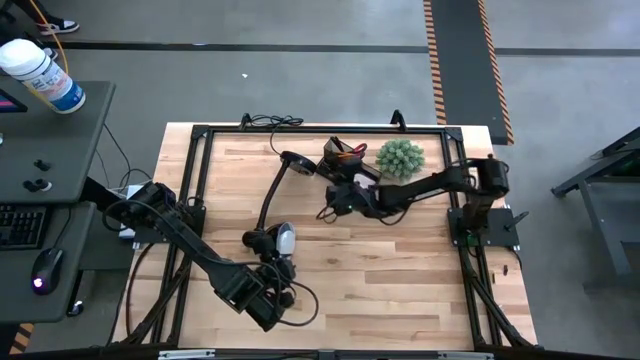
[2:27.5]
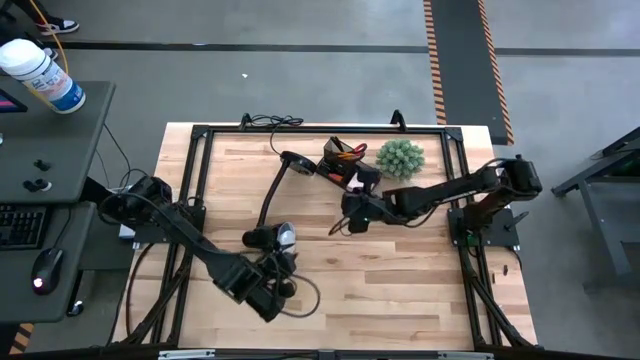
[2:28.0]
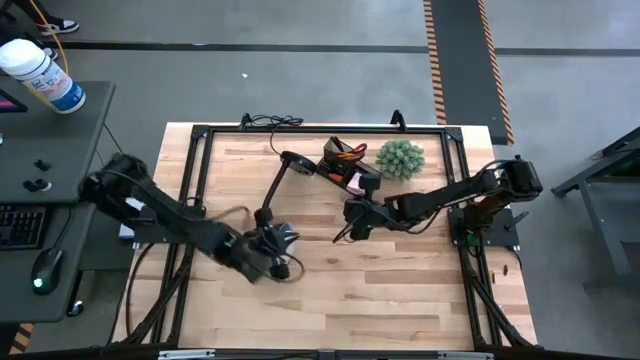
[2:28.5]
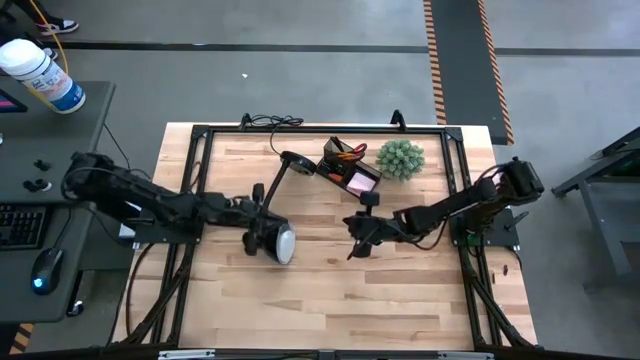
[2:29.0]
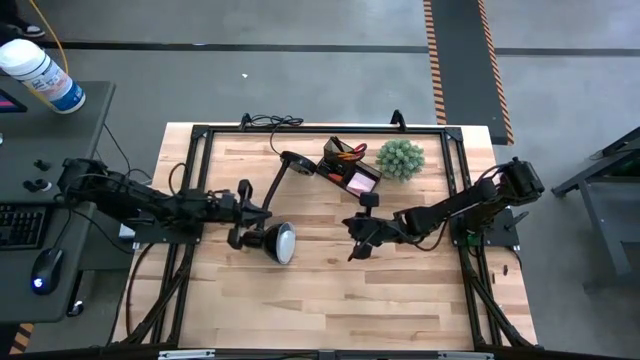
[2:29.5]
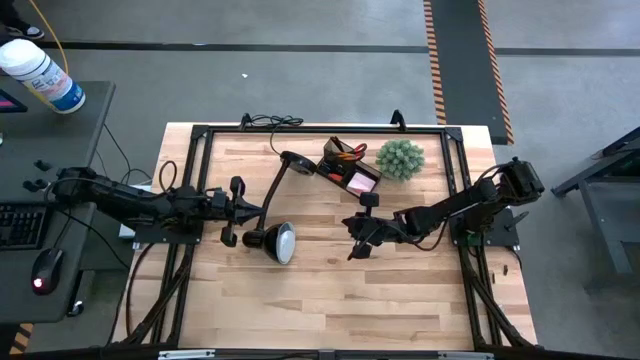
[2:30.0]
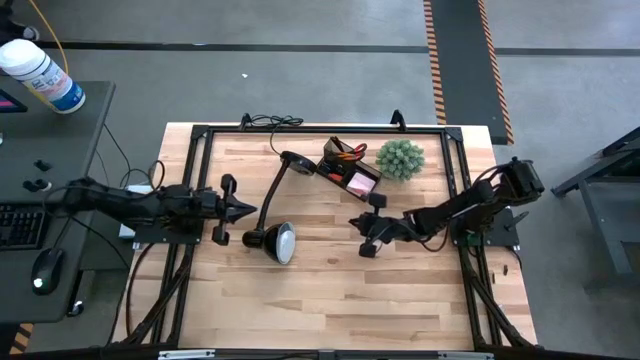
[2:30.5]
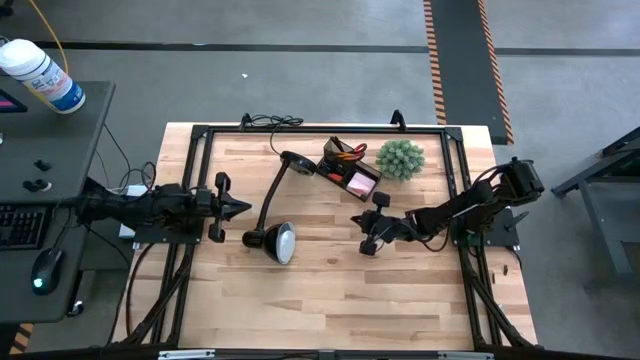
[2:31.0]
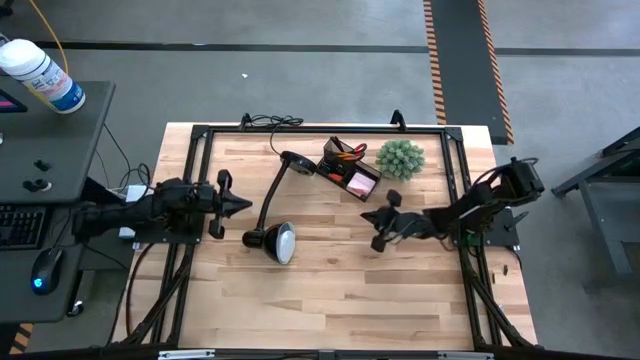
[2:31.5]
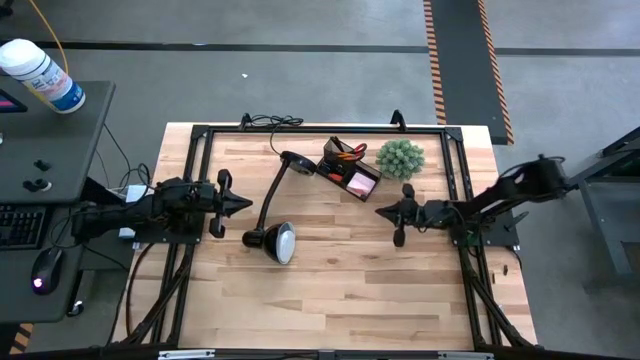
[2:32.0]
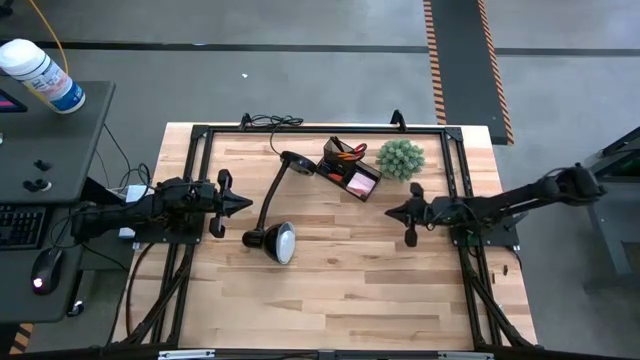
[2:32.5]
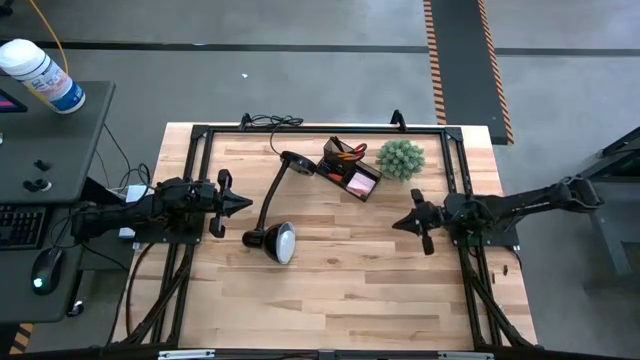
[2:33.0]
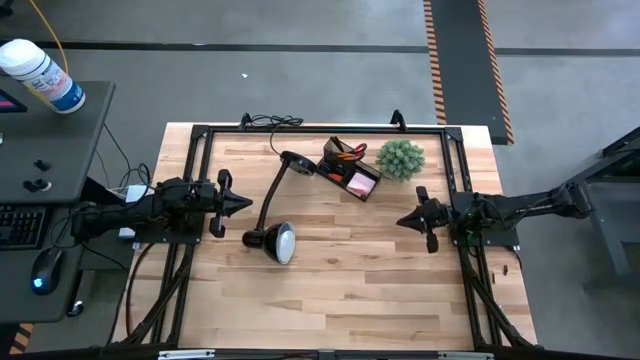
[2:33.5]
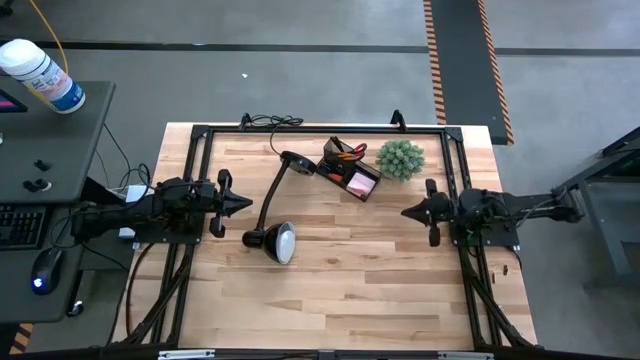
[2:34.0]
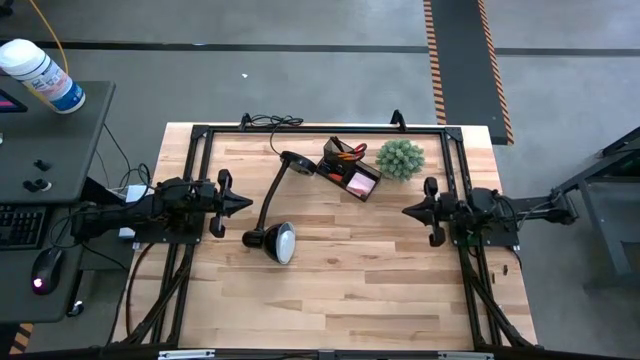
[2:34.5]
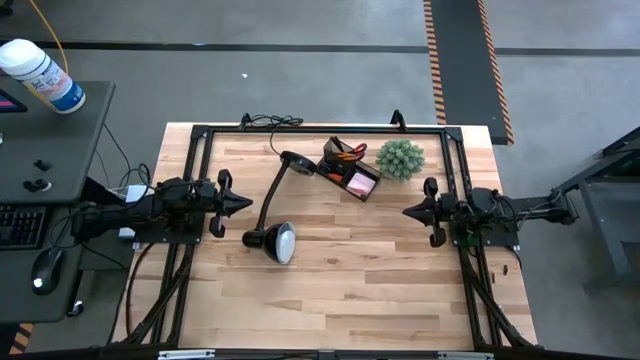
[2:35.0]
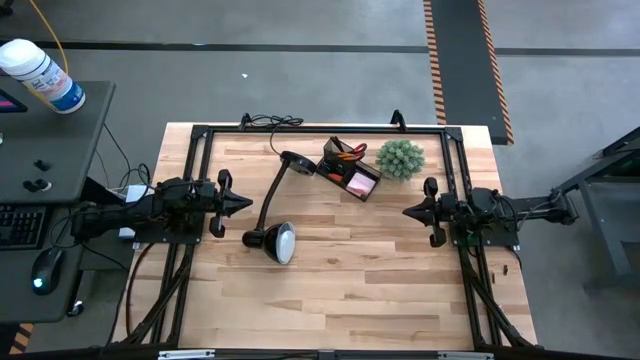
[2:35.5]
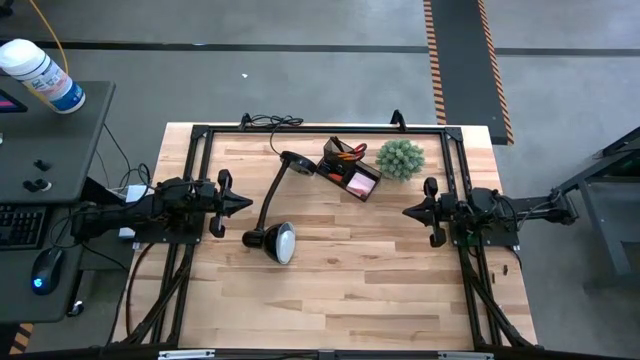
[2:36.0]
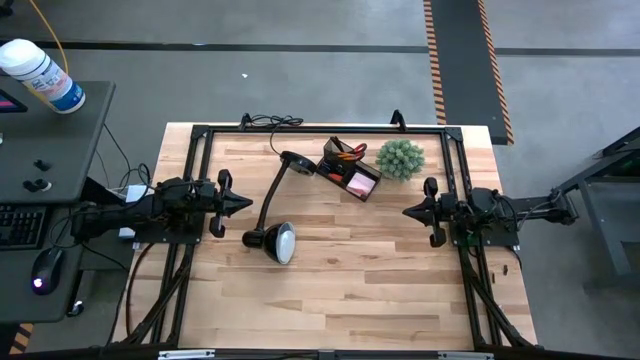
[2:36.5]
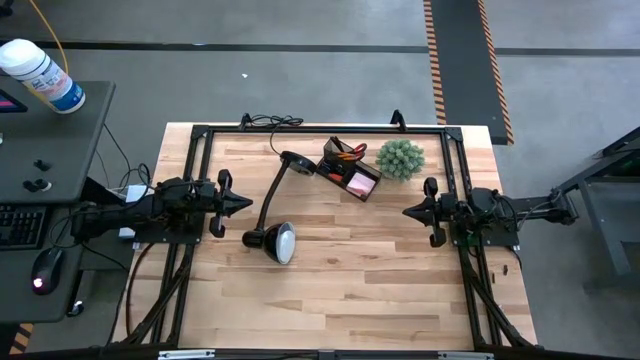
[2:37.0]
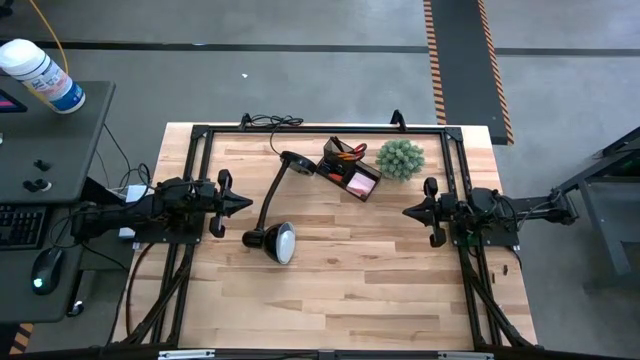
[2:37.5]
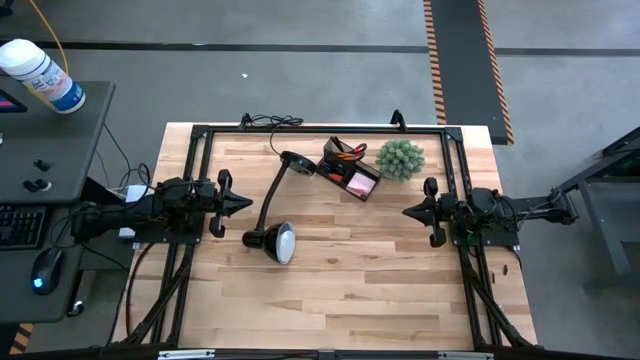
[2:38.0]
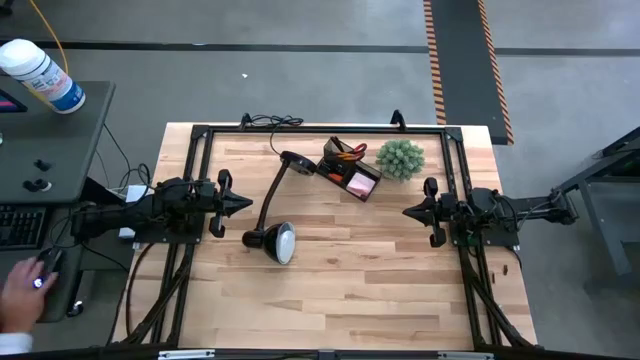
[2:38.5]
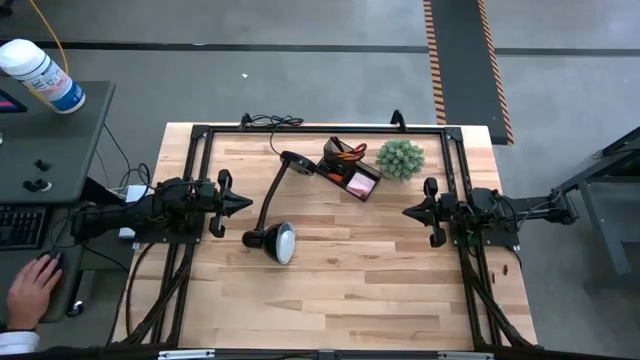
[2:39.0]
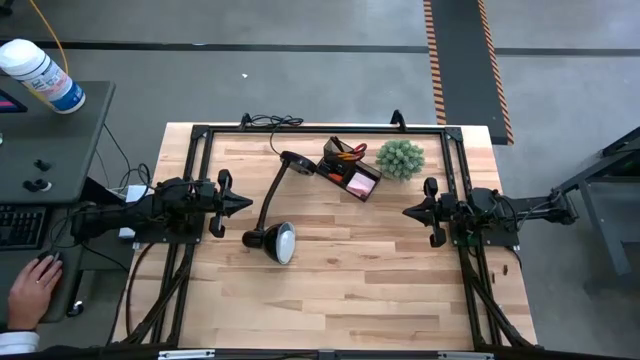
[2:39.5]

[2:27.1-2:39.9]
Task: Pick and place office supplies into organizer
Return to Home Position

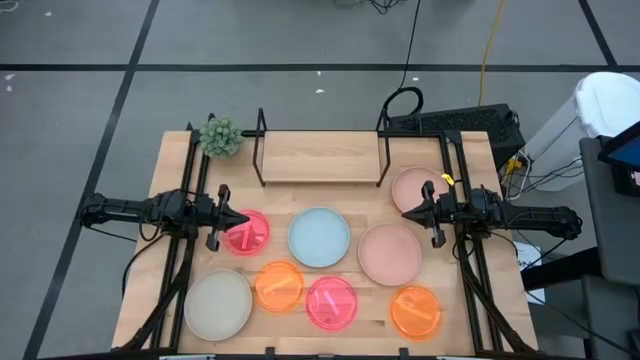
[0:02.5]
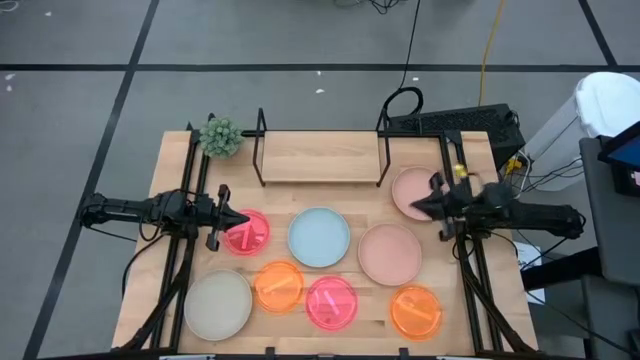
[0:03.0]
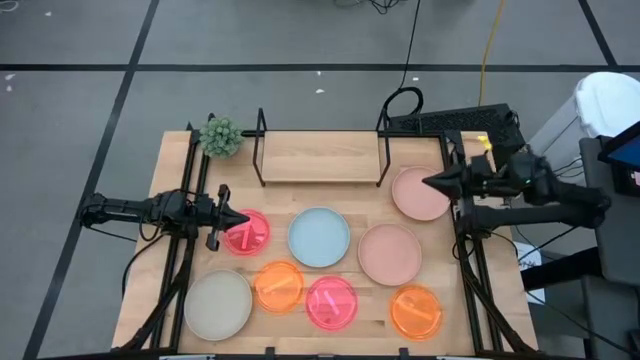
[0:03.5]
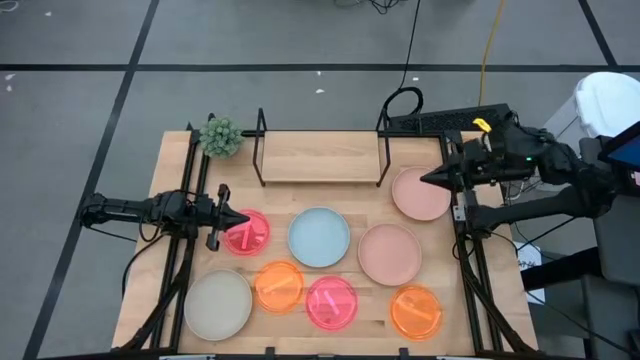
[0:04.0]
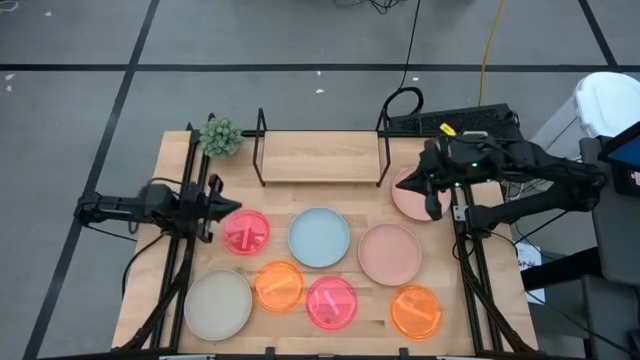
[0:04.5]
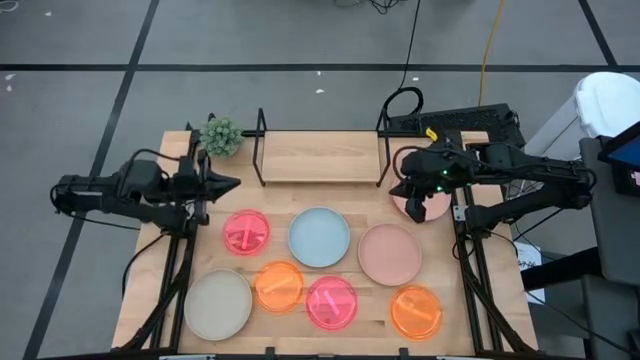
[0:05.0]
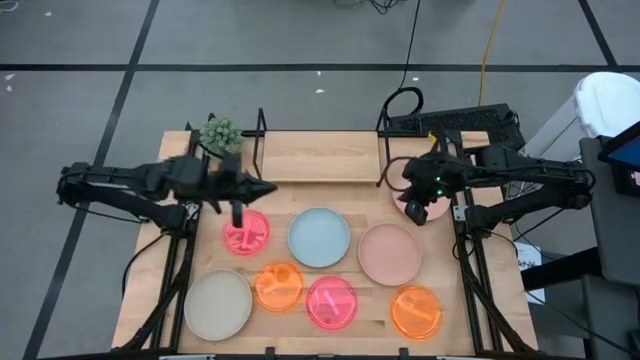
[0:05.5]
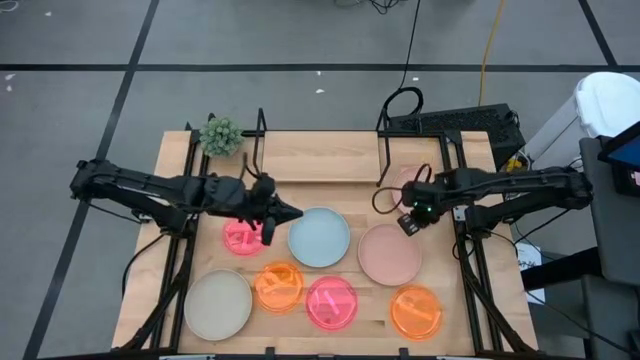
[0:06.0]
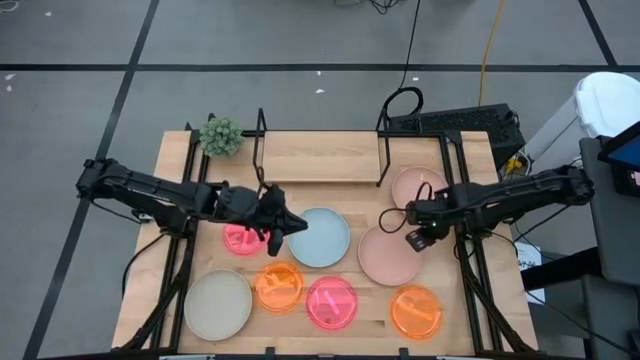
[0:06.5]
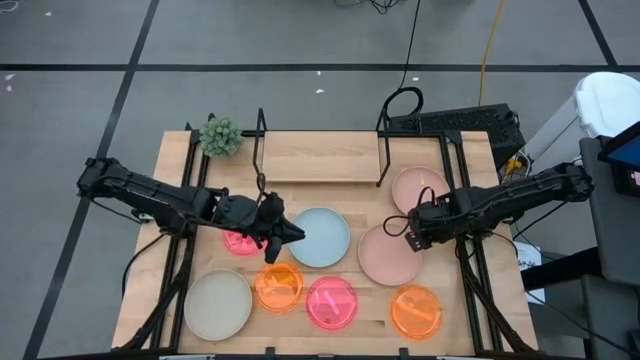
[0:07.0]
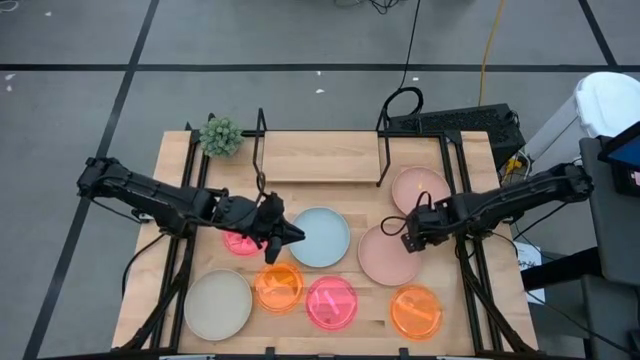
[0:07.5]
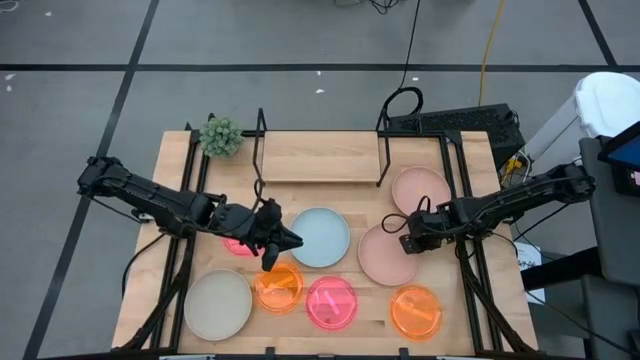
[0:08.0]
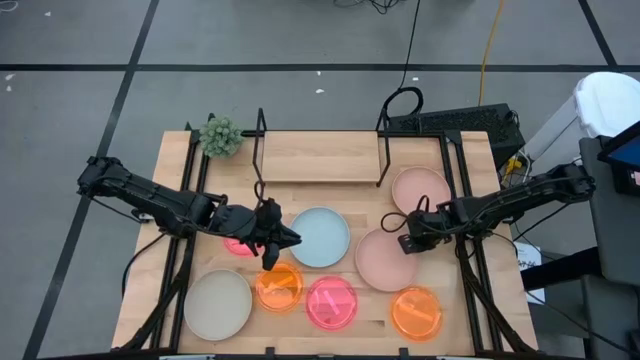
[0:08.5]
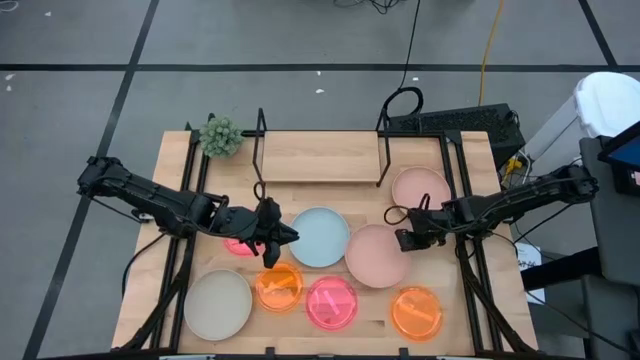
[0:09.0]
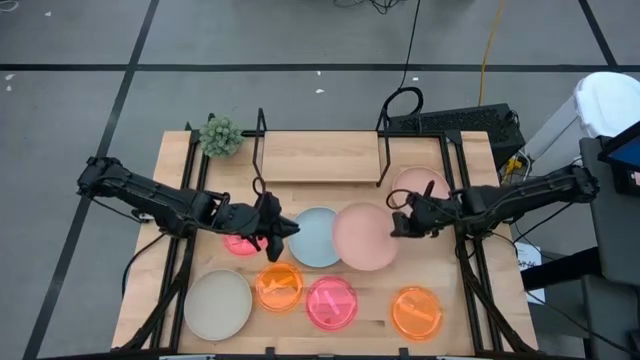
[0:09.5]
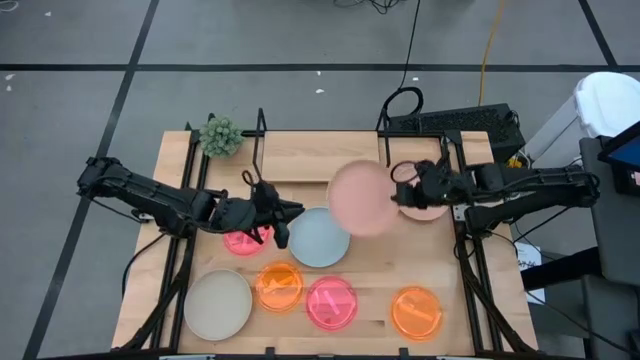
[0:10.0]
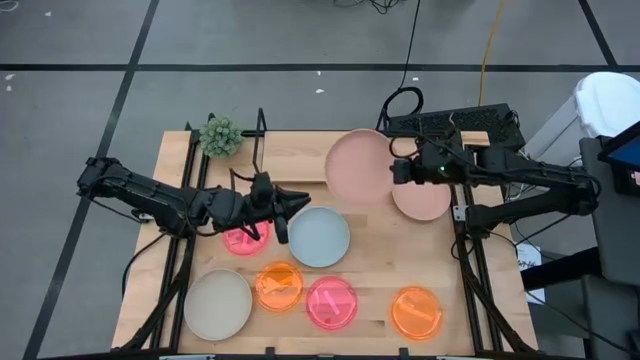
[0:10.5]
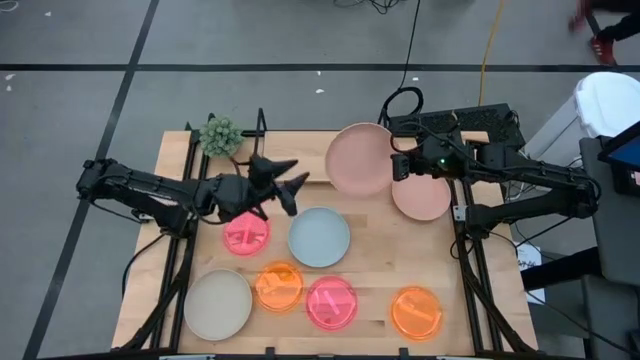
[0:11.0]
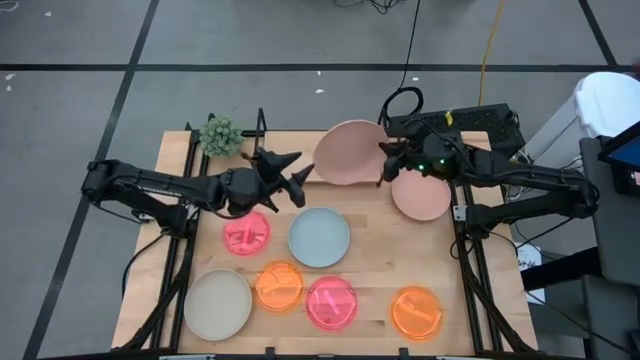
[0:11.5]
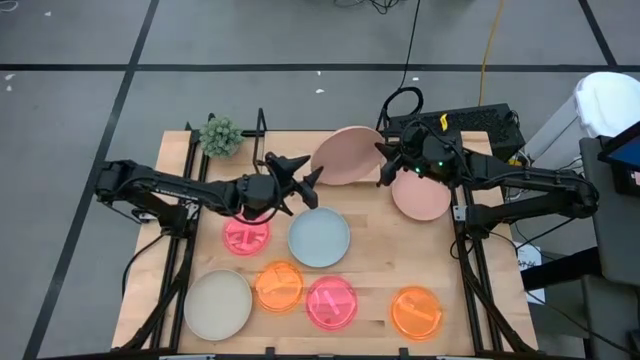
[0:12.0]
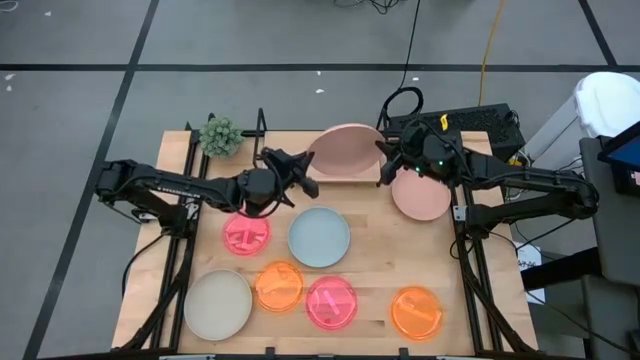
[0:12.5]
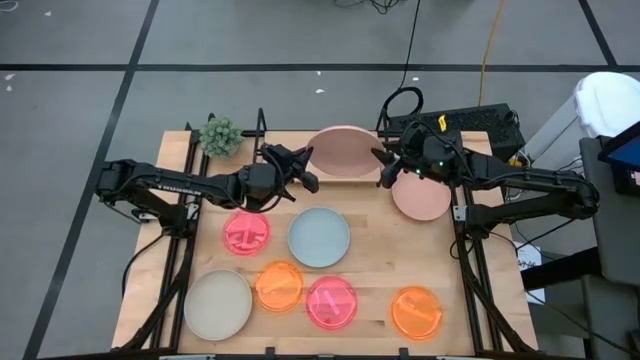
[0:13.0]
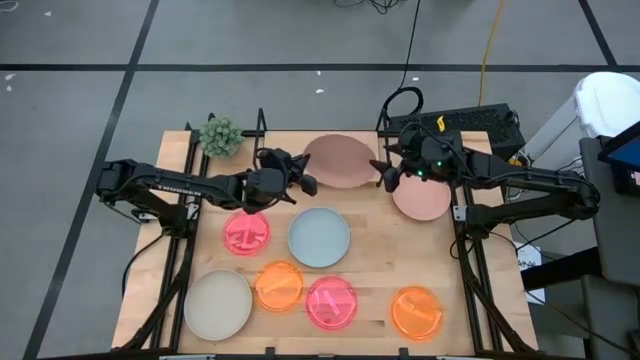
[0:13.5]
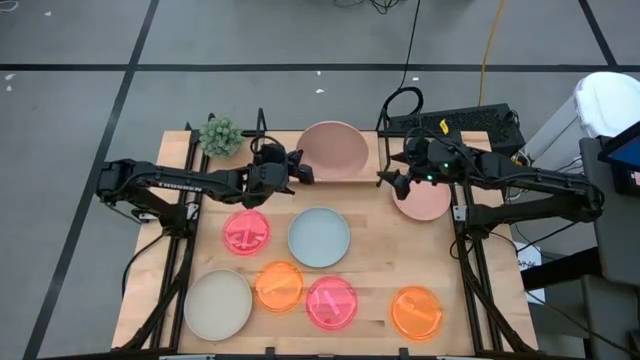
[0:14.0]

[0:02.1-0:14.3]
Task: Place and stack plates onto a shelf
Put the bottom pink plate on the shelf
